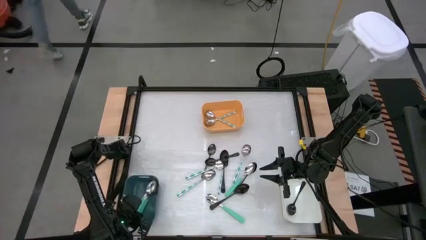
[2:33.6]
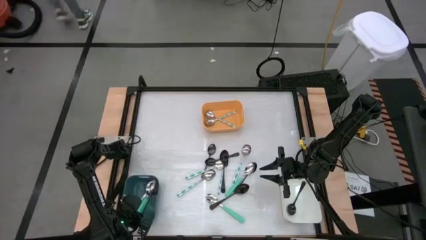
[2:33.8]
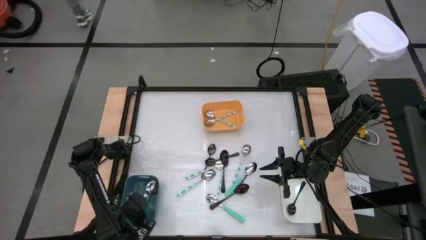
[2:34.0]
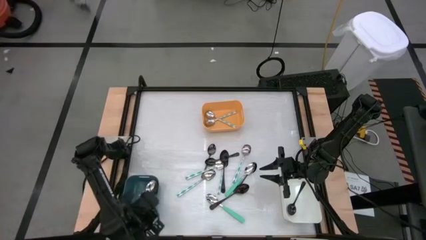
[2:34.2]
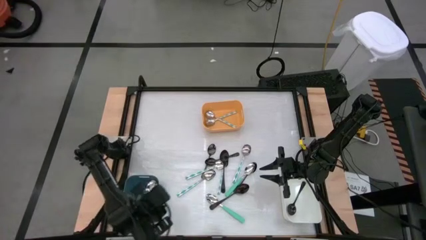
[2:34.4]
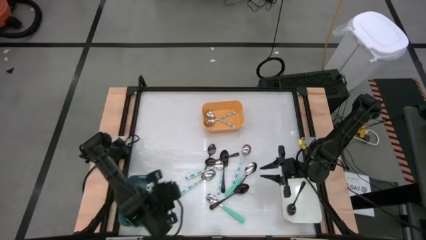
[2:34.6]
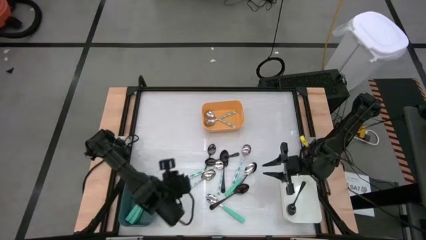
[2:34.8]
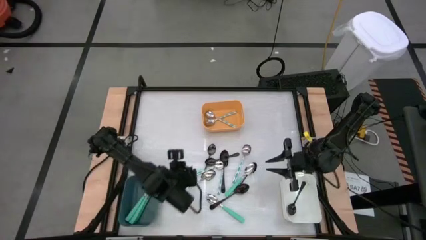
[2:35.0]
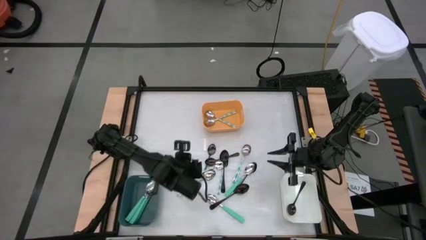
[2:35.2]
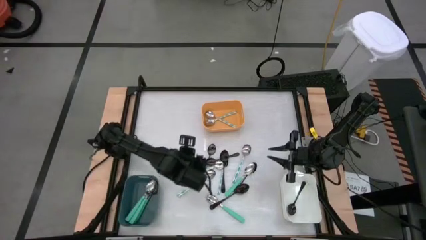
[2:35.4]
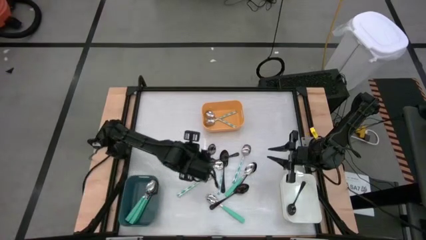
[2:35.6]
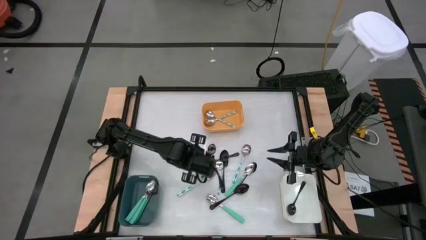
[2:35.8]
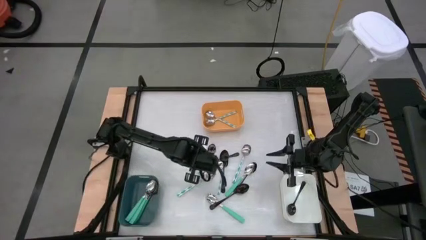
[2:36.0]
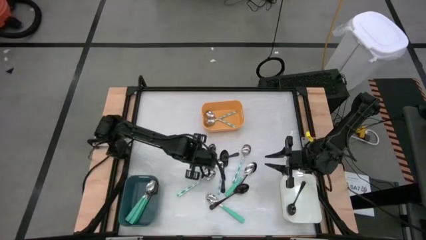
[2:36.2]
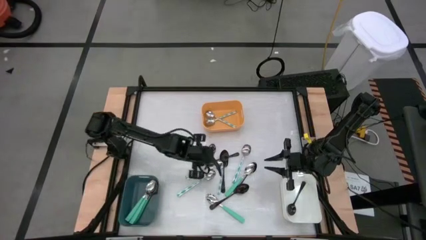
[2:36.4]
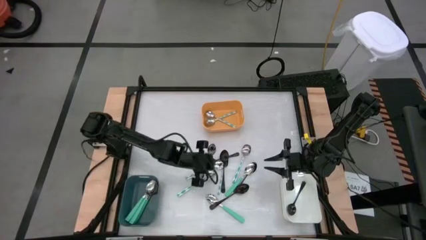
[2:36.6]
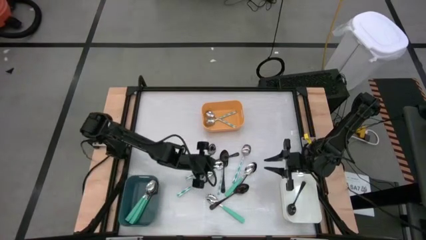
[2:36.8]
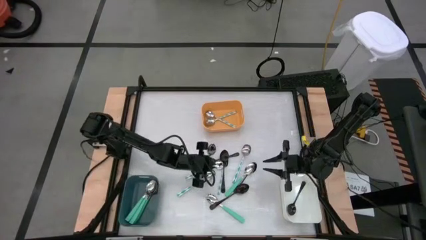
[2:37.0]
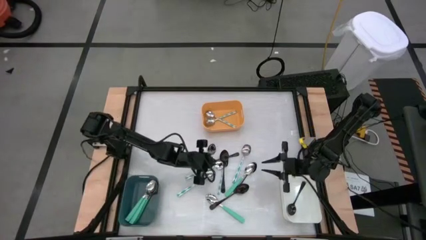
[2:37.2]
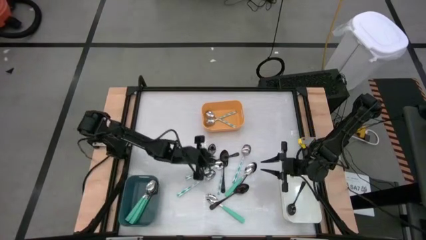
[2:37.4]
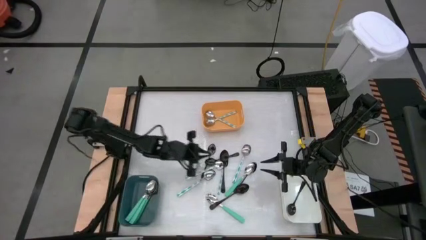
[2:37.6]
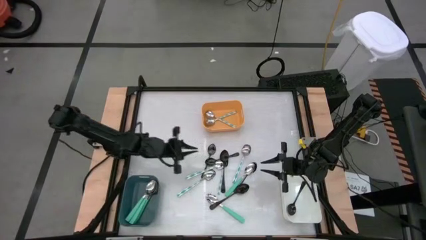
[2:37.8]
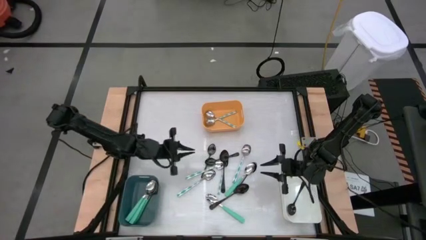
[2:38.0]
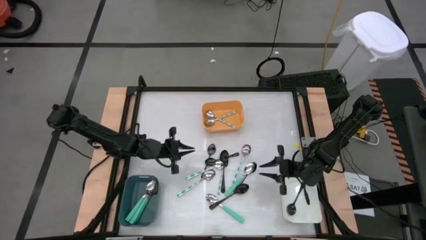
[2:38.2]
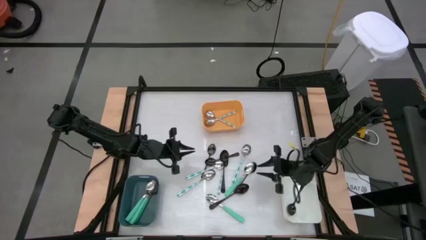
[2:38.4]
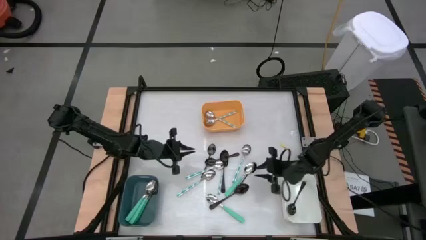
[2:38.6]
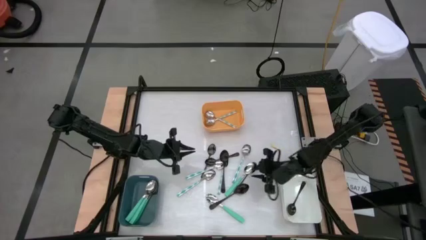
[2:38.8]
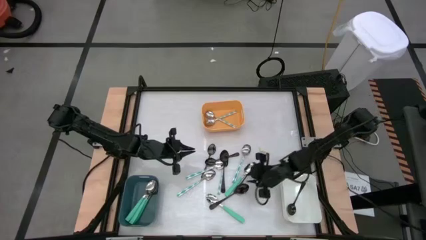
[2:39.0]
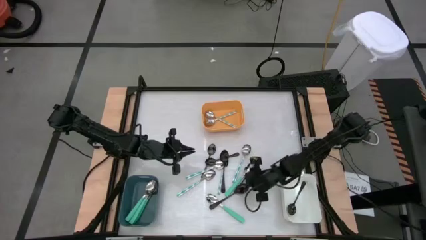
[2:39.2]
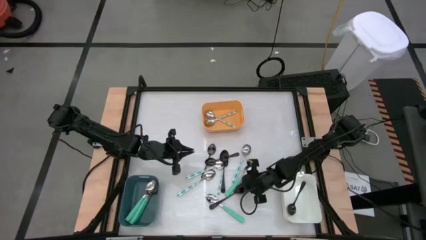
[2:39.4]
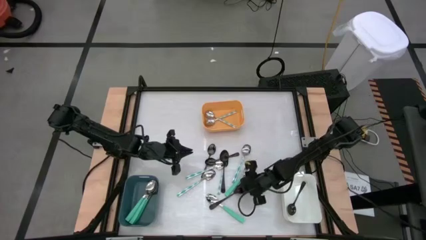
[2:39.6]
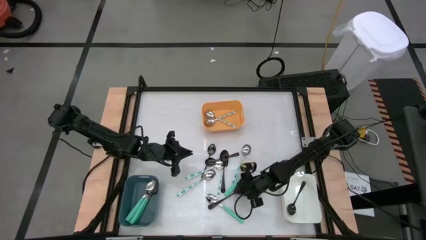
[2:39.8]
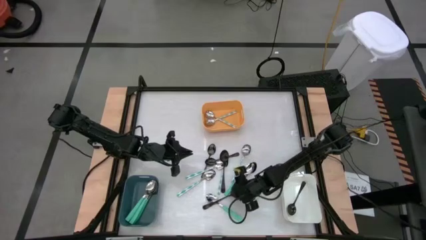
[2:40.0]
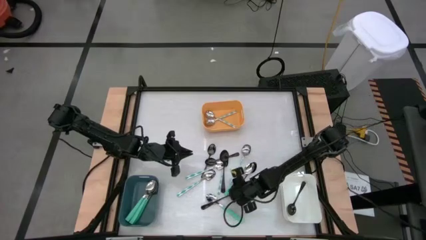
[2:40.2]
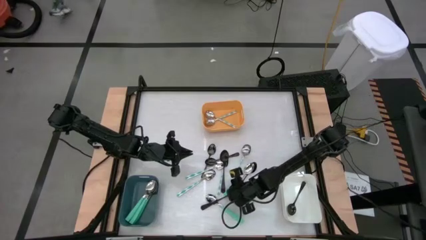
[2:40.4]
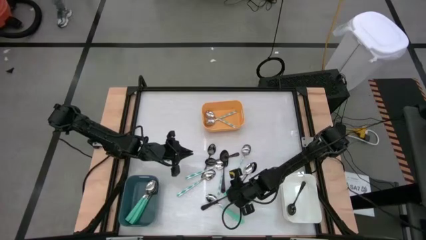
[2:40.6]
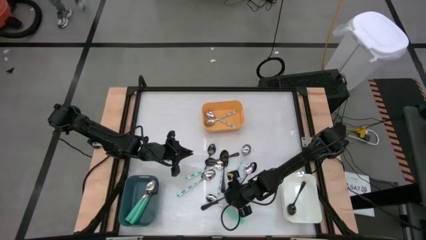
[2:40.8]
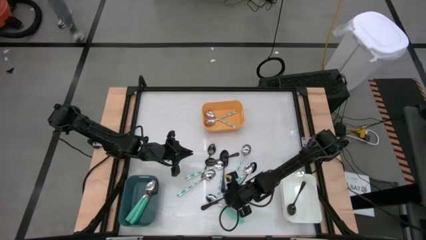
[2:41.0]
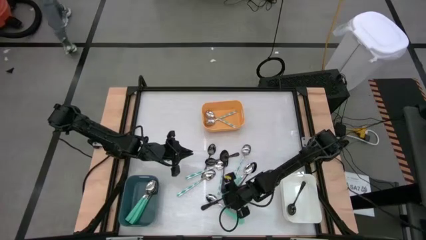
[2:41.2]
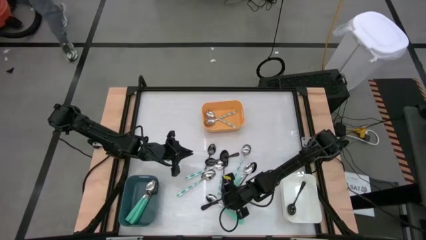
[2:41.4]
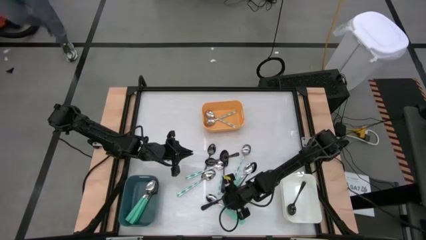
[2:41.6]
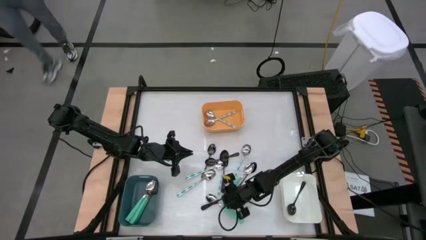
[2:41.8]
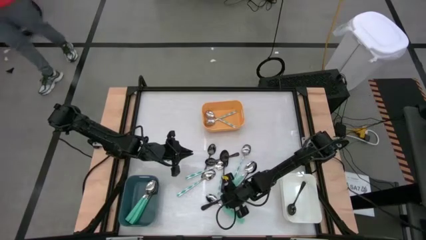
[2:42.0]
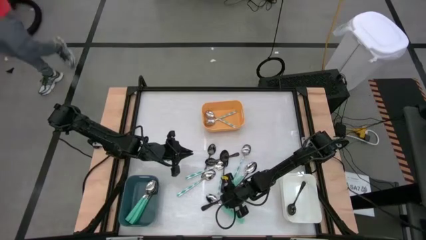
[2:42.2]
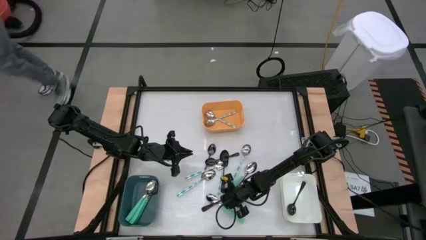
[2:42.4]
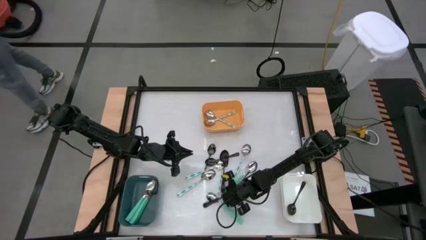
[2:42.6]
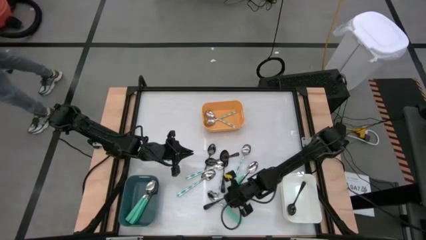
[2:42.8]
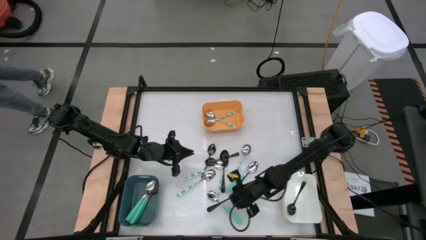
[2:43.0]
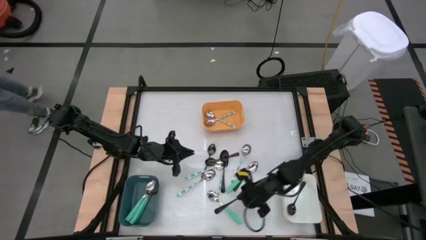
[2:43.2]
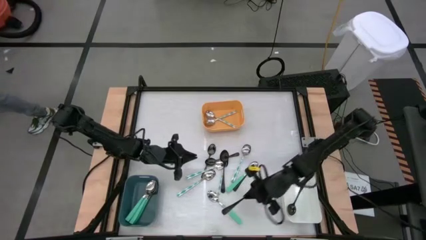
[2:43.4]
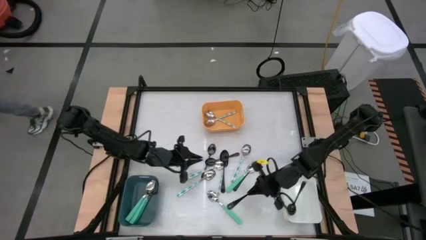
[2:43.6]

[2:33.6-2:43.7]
Task: Sort silverware by color (type)
Put the black spoon into the white bin

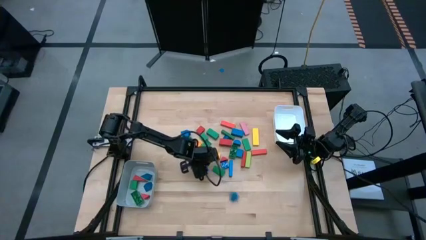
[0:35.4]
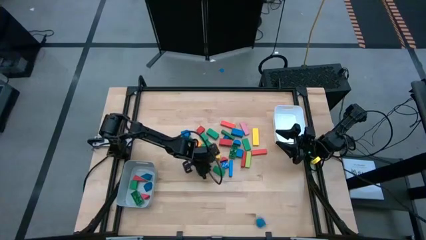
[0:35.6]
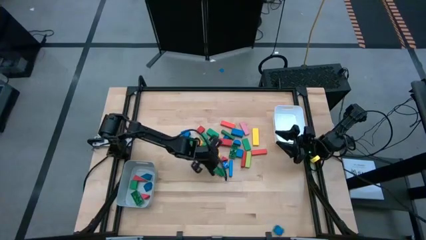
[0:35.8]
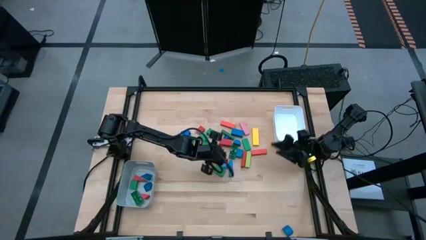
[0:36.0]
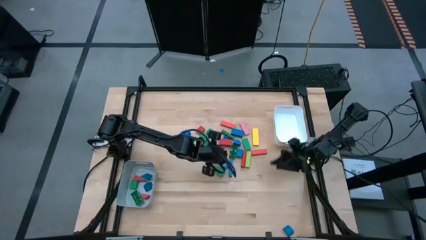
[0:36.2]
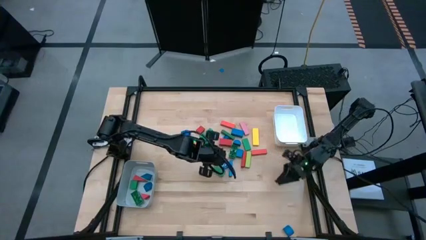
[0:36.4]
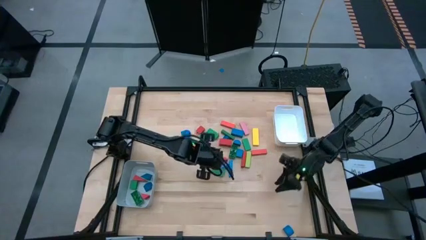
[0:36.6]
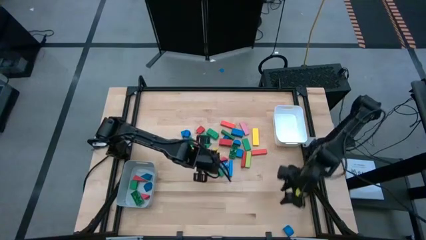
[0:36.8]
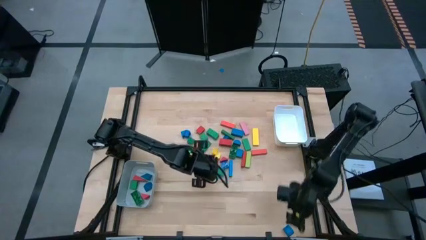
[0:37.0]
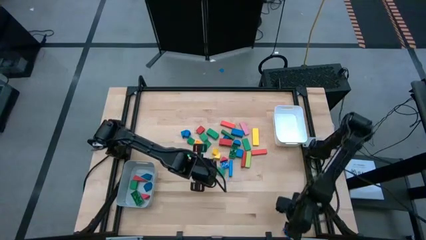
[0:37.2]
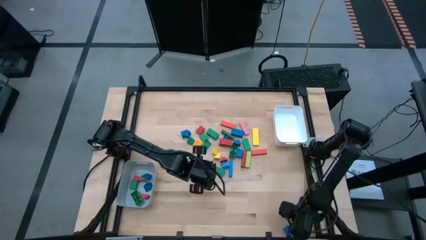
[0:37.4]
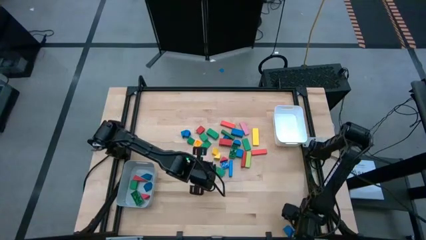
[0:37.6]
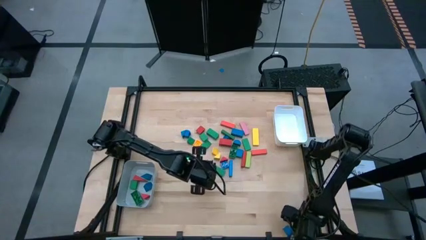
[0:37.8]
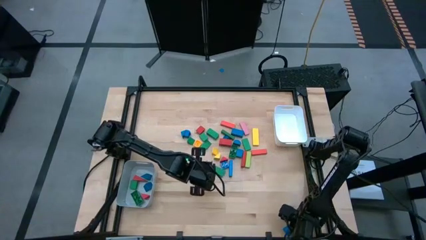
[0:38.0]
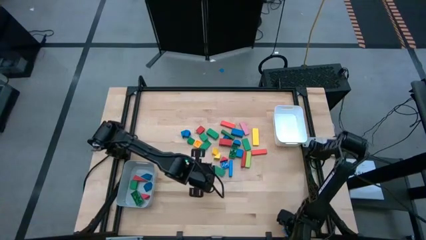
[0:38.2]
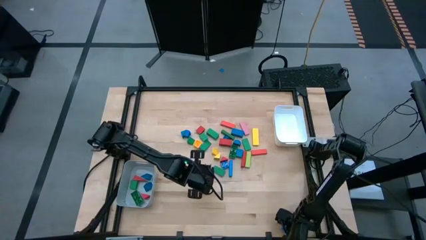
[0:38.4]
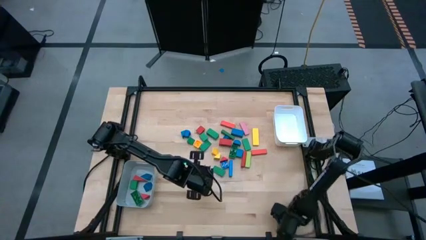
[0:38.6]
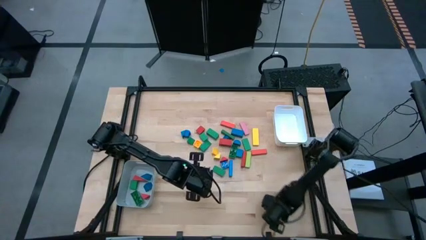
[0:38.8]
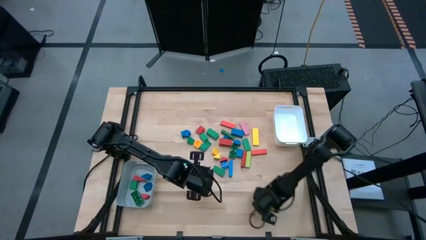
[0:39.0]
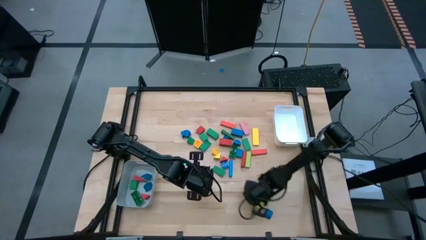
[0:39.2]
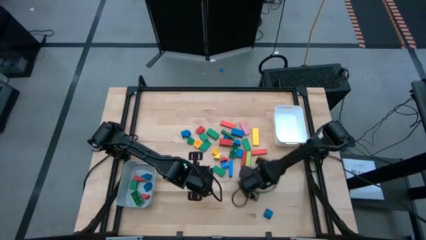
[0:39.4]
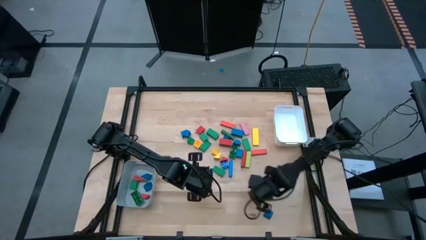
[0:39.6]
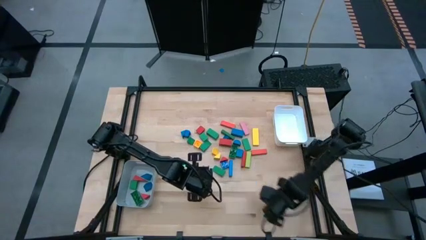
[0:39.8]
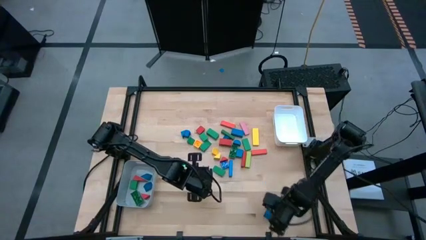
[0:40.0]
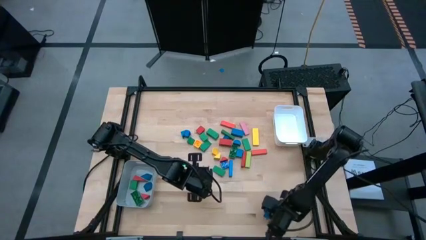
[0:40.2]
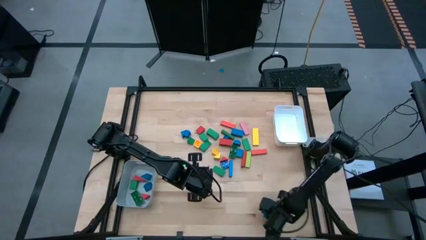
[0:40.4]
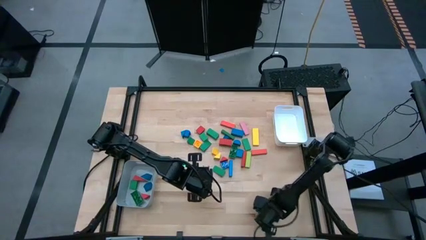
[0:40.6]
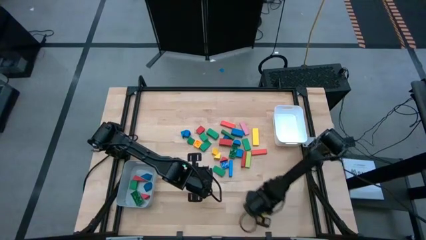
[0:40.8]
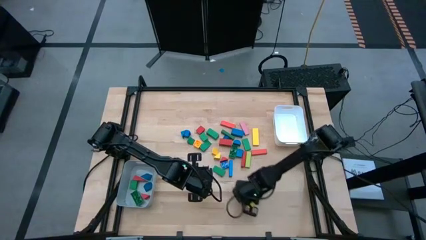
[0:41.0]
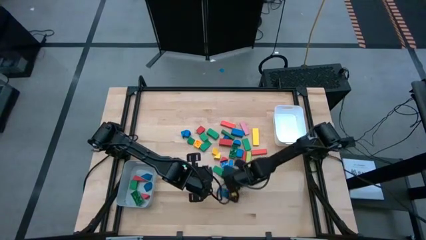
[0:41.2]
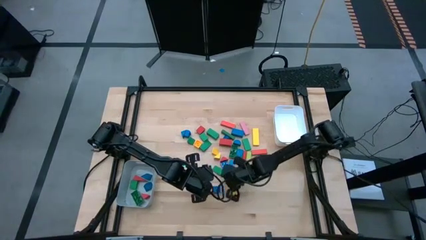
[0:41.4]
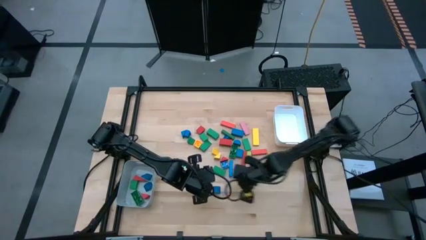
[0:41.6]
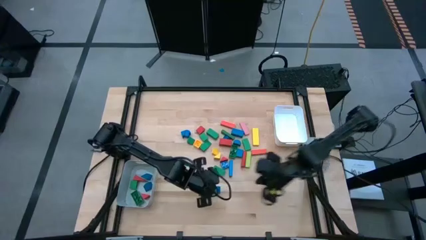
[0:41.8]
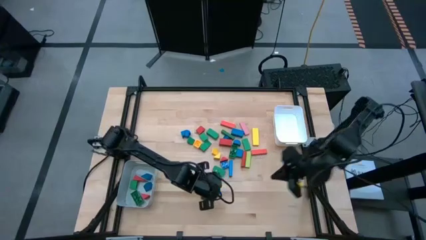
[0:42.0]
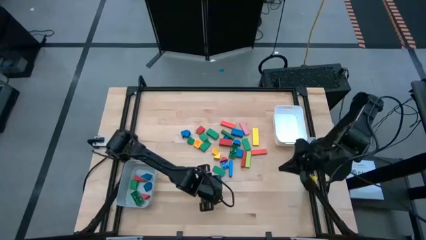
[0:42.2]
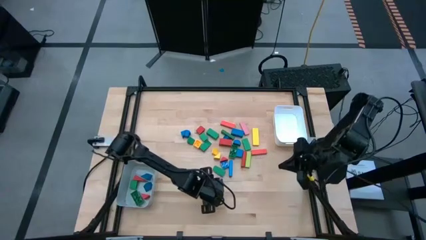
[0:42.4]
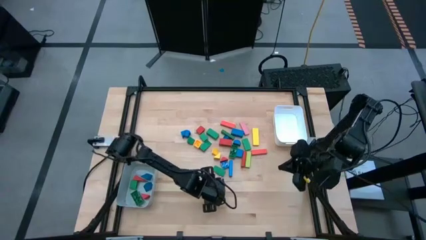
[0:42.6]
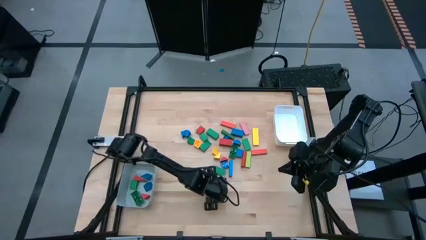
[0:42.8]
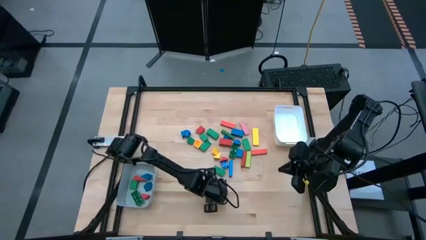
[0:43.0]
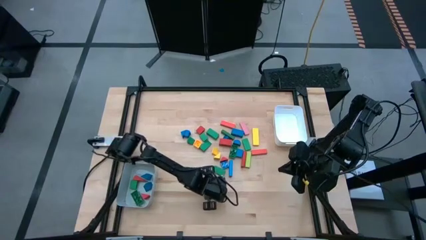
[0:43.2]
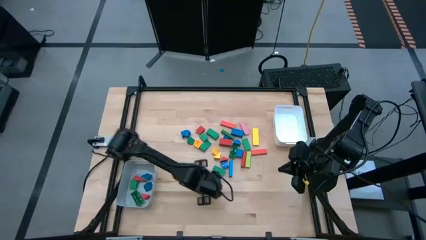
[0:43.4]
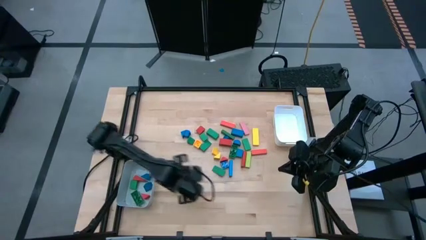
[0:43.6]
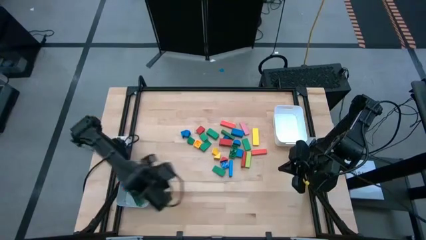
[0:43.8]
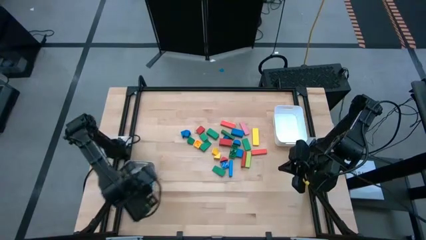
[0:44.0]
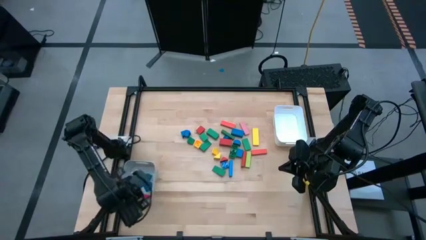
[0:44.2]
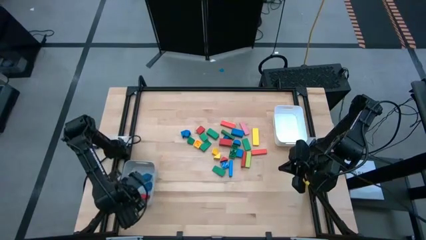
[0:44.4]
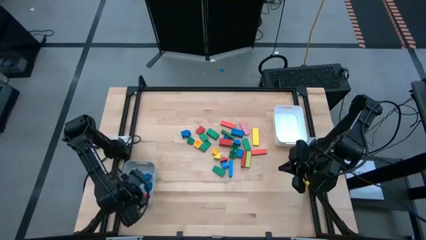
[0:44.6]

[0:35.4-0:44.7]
Task: Sort blocks by size
Put the blue half cylindrical block into the gray bin
